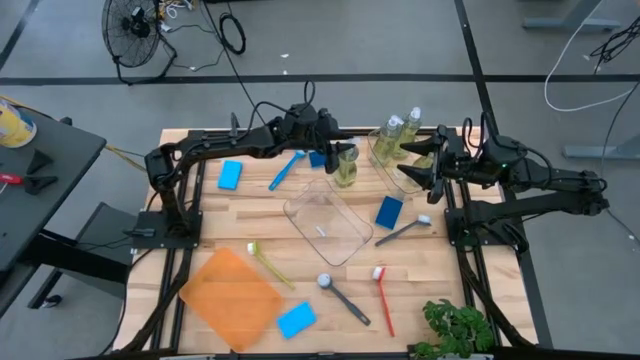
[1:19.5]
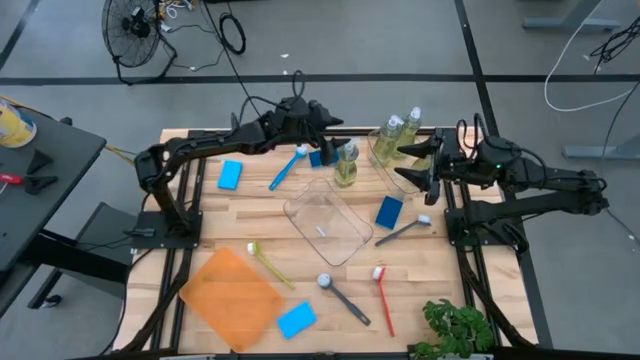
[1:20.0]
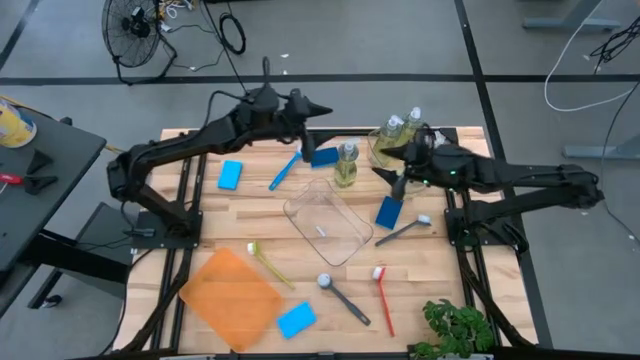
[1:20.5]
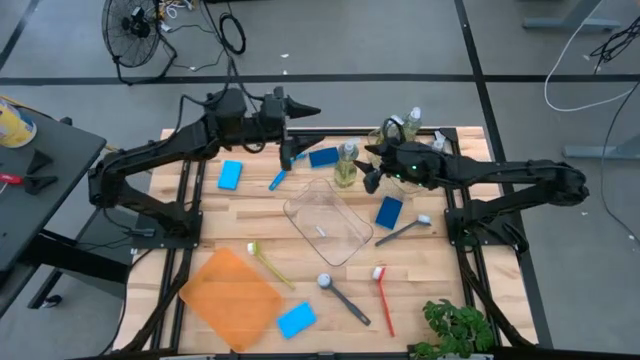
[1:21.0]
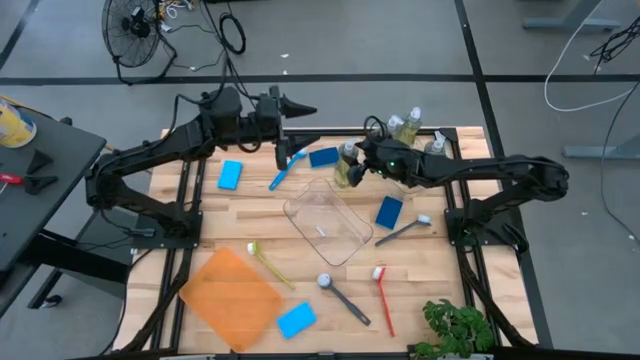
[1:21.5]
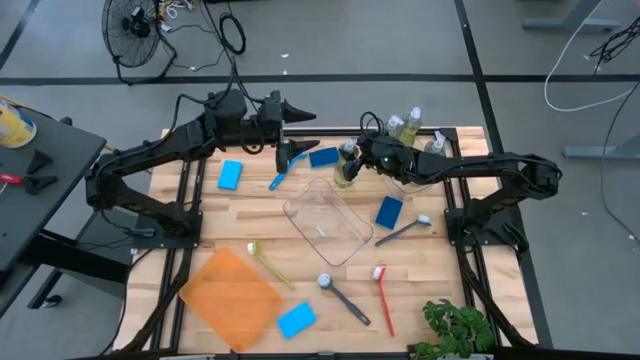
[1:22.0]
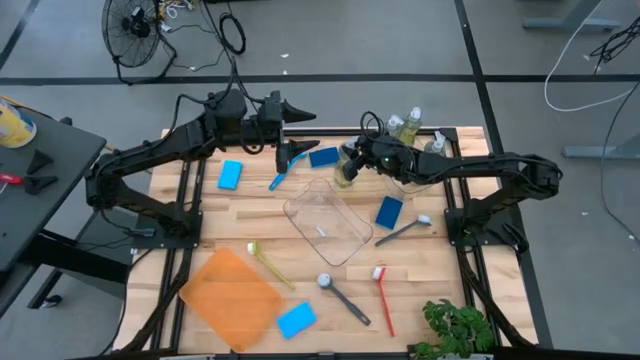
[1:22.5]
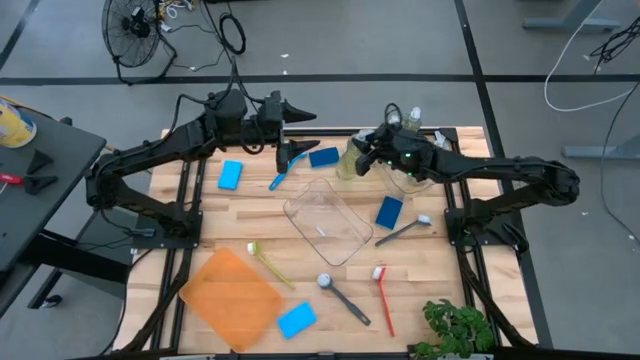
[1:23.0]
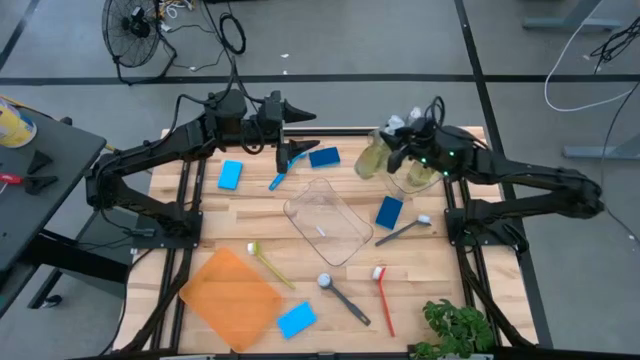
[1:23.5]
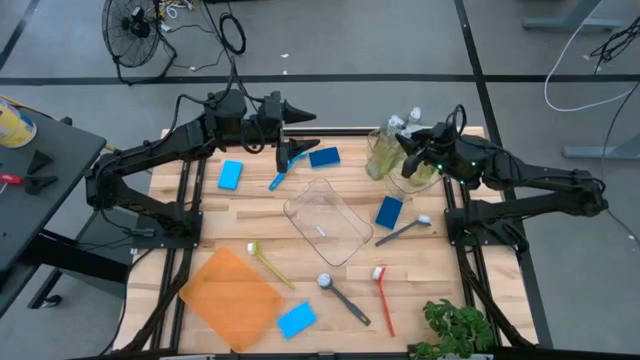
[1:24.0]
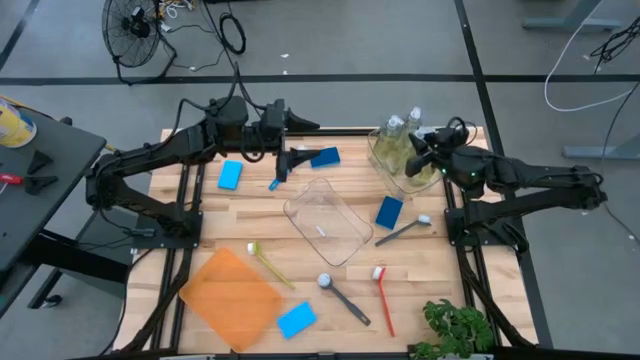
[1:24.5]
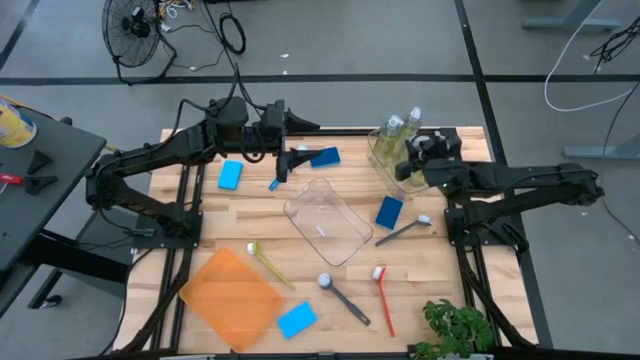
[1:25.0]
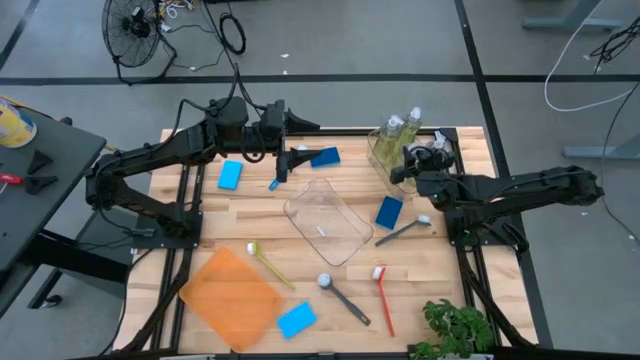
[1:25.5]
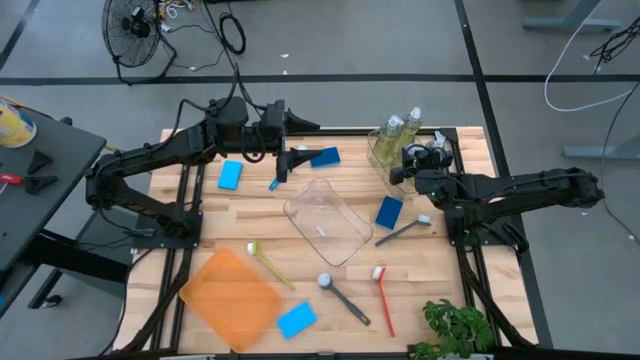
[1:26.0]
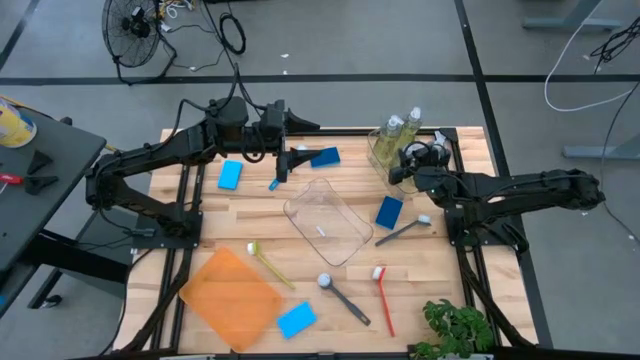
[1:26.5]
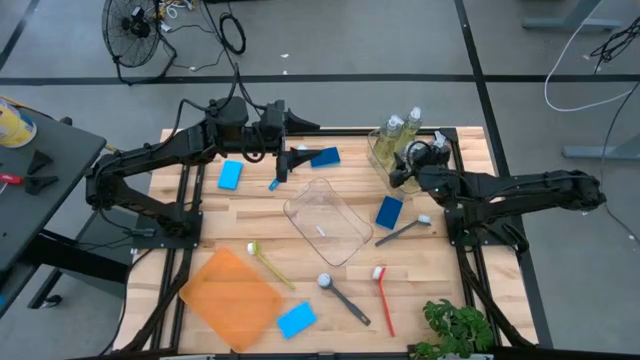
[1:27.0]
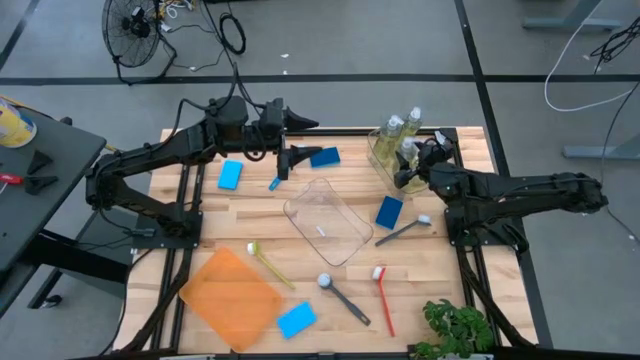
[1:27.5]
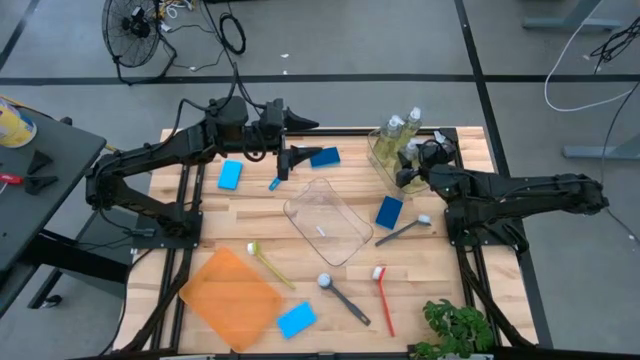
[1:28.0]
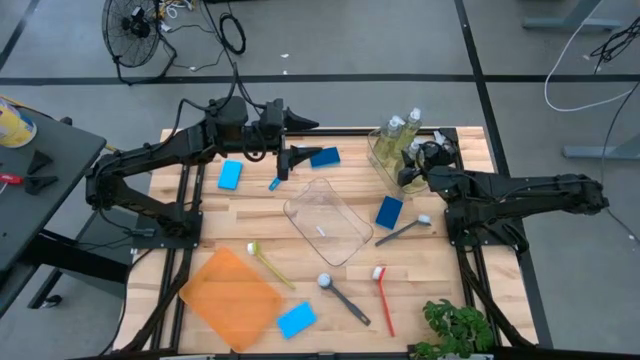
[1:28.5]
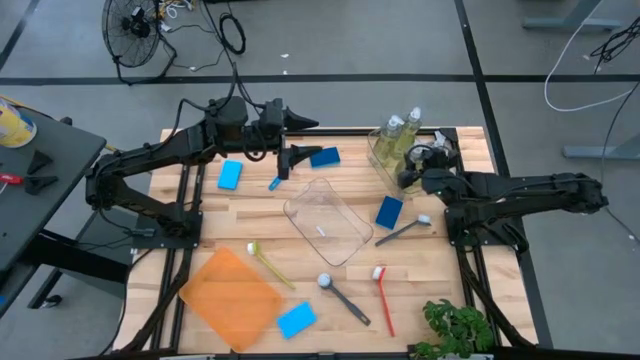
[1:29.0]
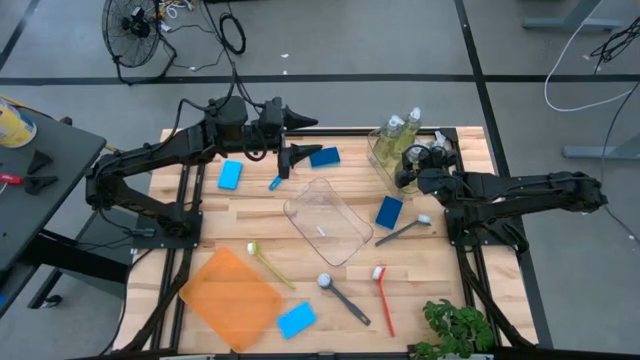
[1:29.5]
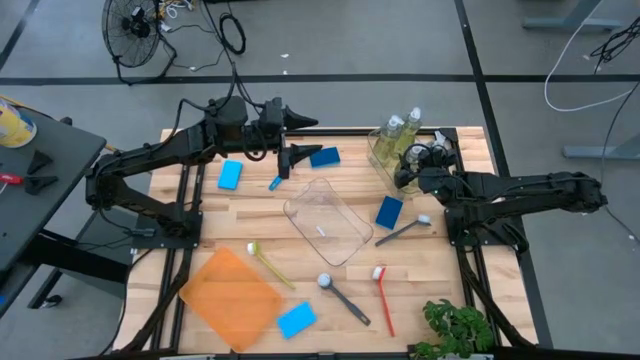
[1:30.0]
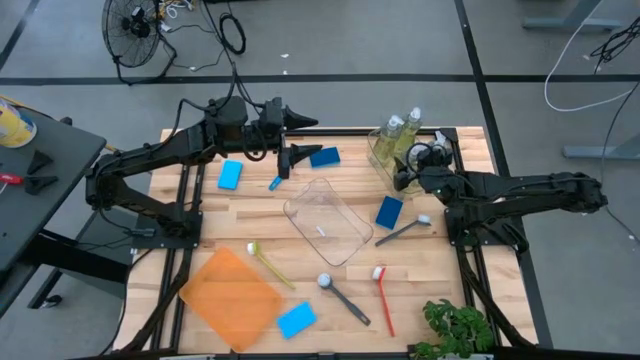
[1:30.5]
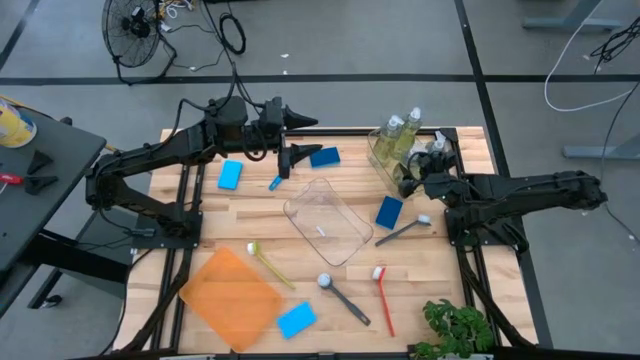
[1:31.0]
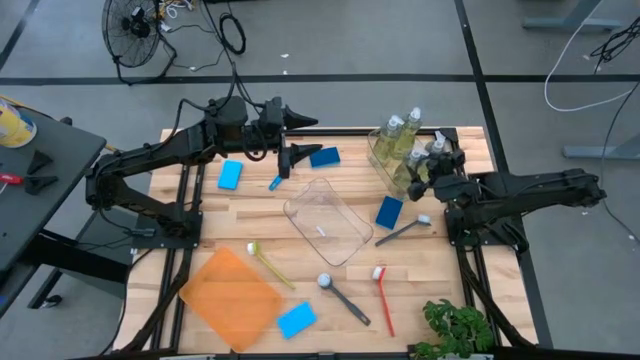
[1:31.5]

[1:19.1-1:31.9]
Task: Pick & Place Kitchen Sink Supplies
Put the yellow dish soap into the top transparent bin

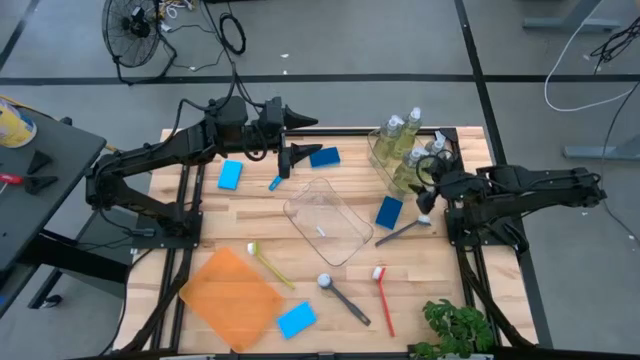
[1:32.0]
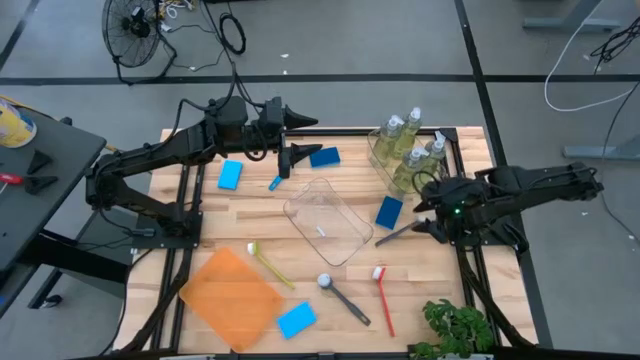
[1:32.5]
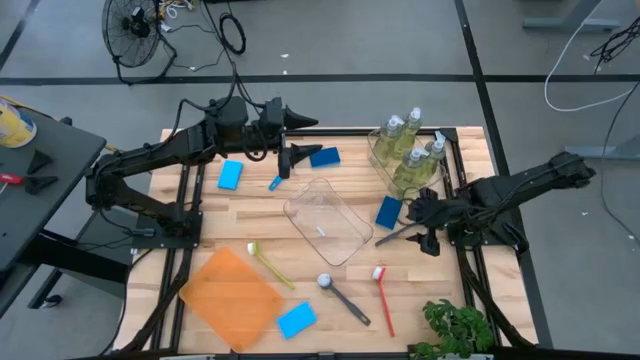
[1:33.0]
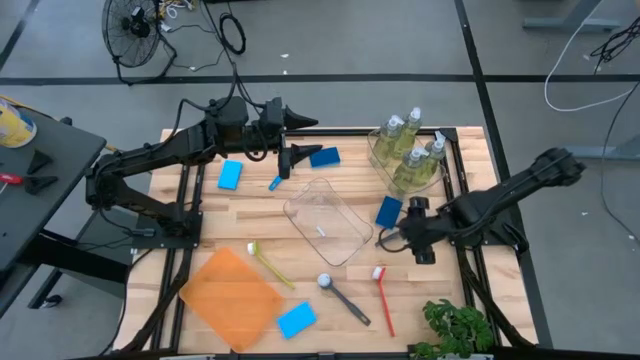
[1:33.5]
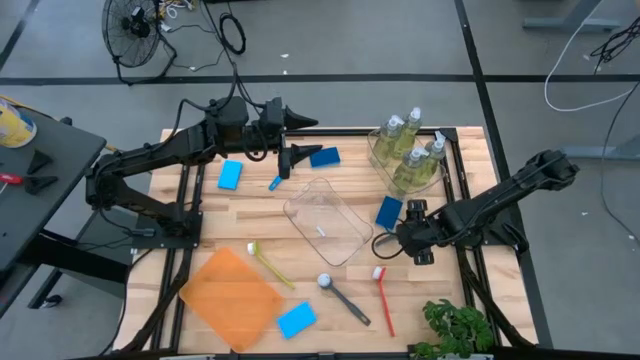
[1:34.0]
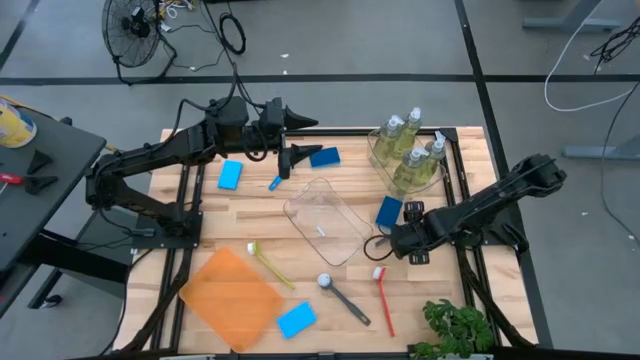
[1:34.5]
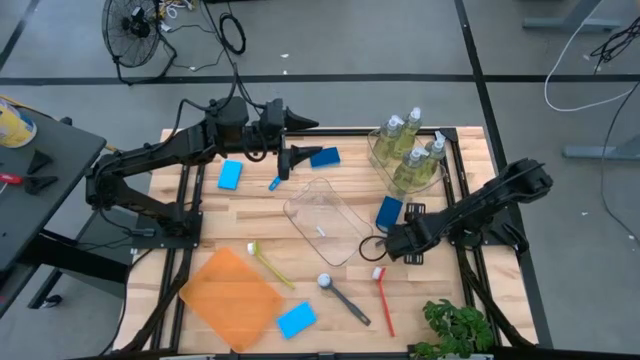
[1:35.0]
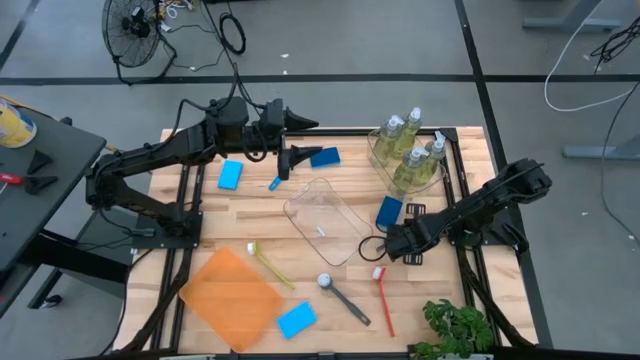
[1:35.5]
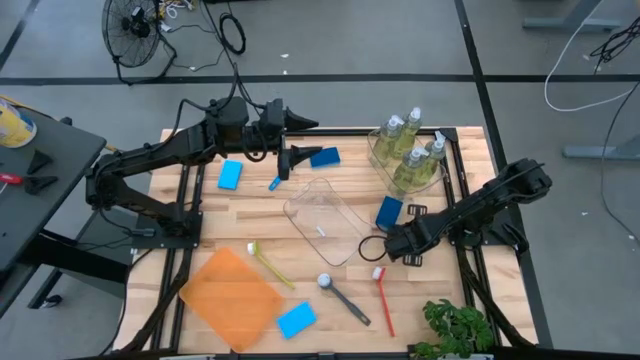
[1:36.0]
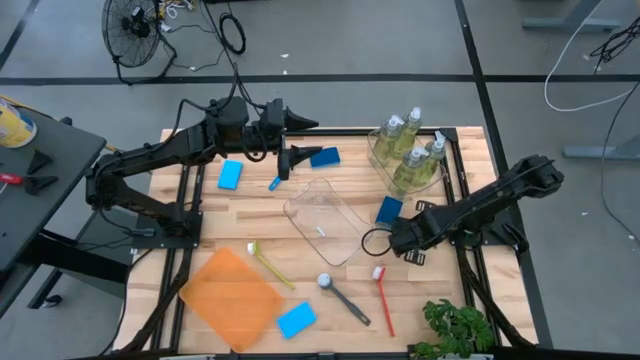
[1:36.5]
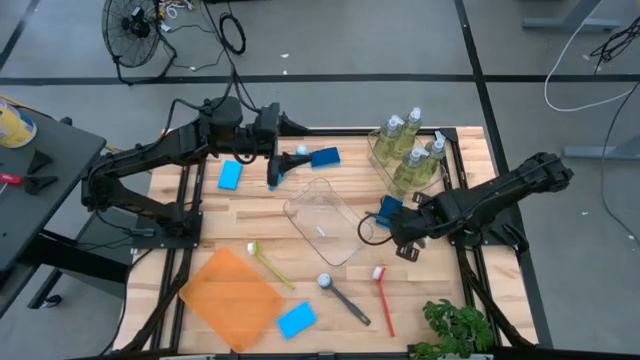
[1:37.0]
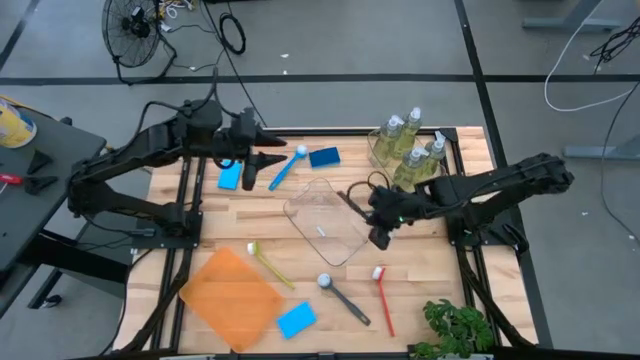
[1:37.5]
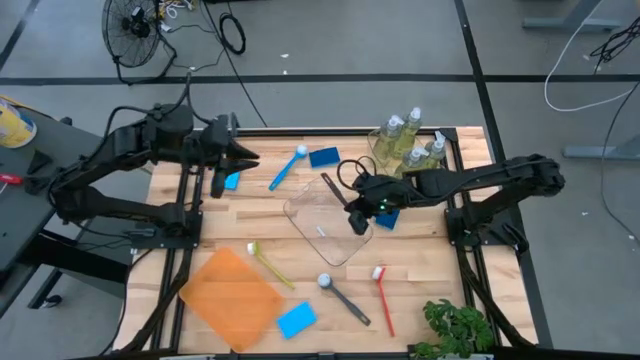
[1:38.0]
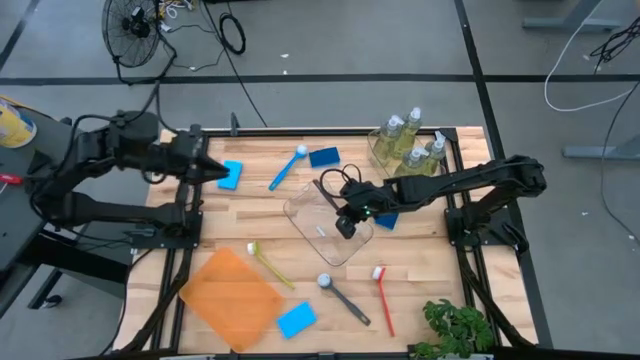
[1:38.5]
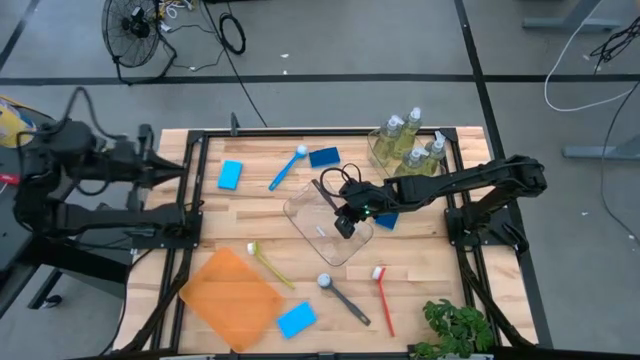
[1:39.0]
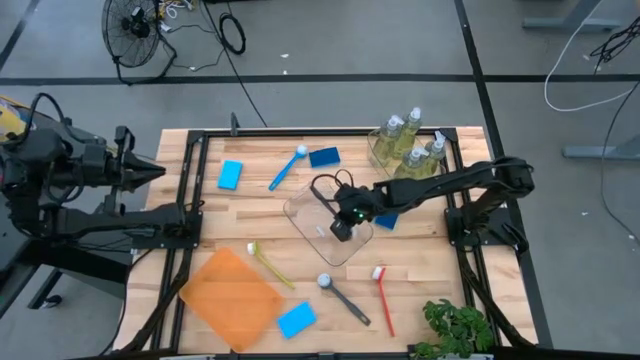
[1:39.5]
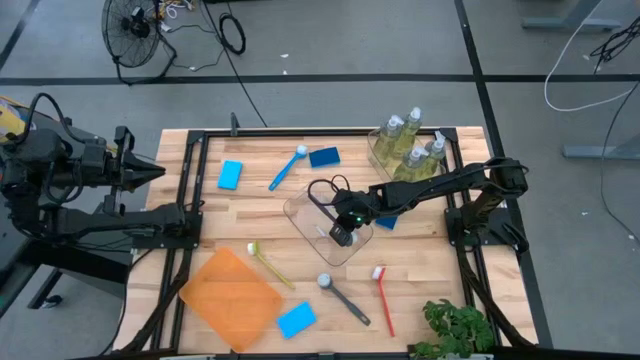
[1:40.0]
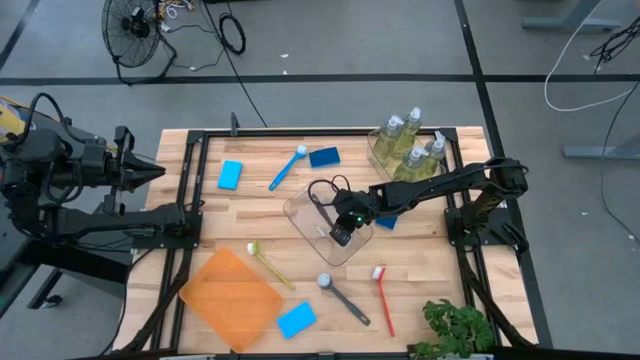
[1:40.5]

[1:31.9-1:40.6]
Put the gray dish brush into the bottom transparent bin
